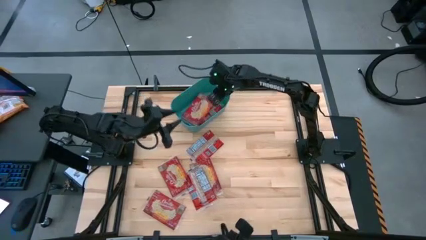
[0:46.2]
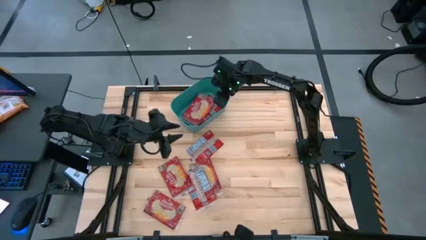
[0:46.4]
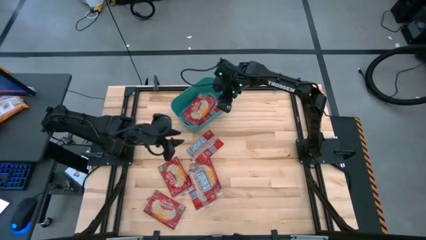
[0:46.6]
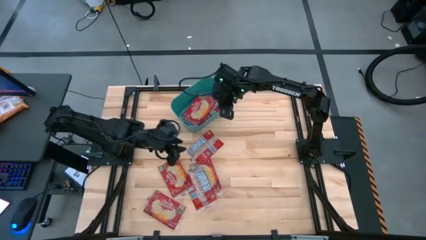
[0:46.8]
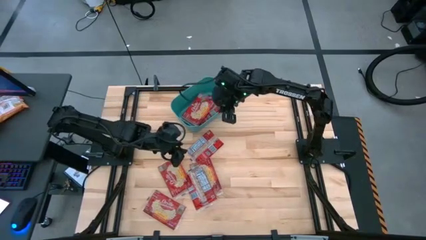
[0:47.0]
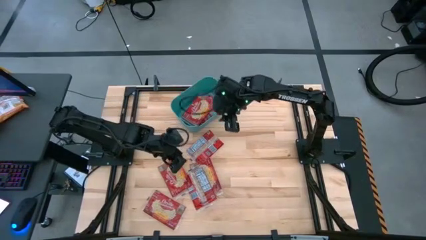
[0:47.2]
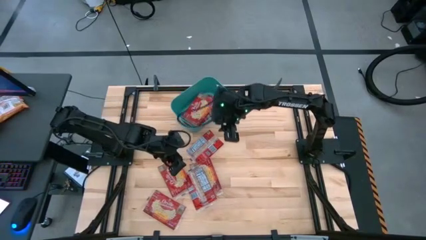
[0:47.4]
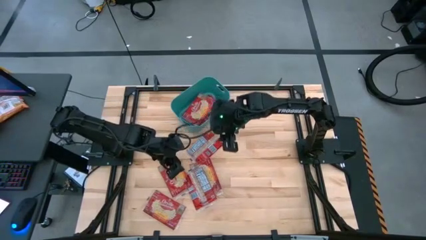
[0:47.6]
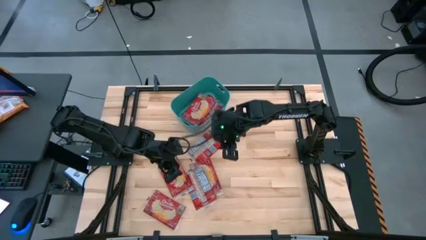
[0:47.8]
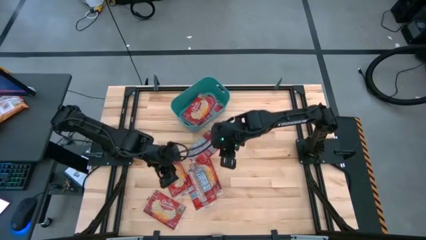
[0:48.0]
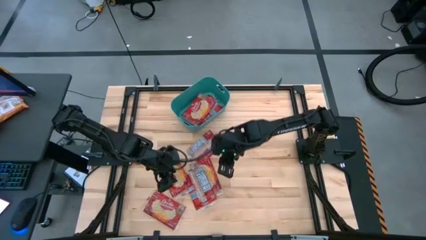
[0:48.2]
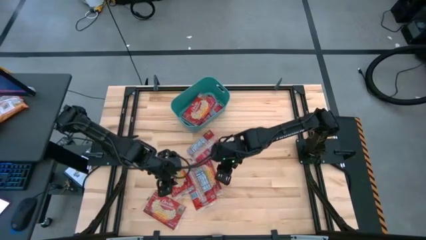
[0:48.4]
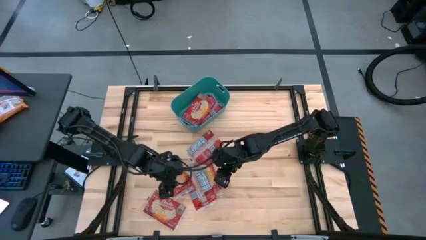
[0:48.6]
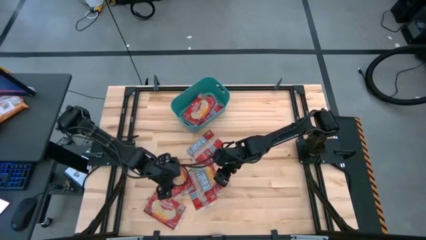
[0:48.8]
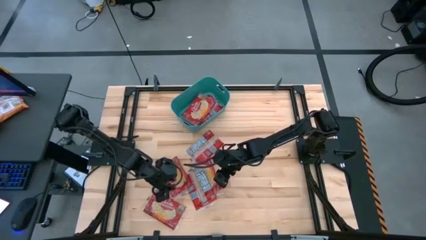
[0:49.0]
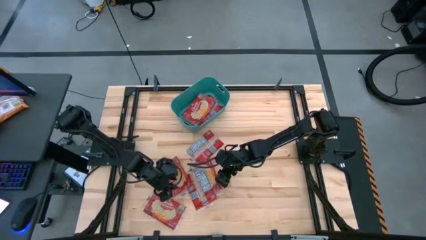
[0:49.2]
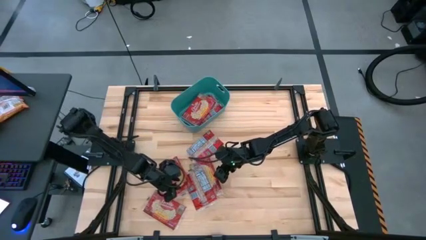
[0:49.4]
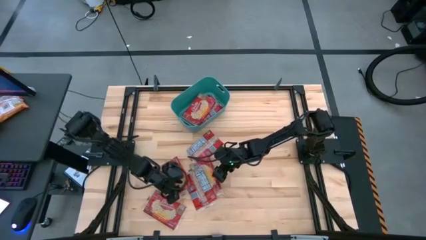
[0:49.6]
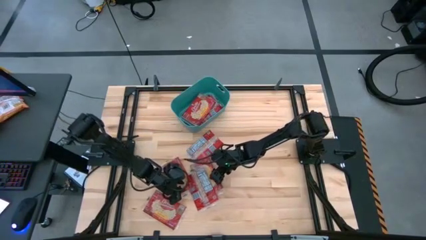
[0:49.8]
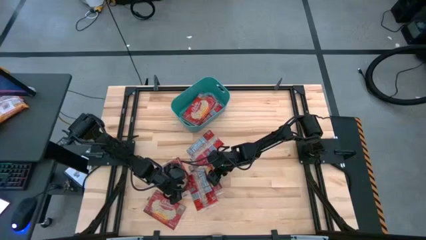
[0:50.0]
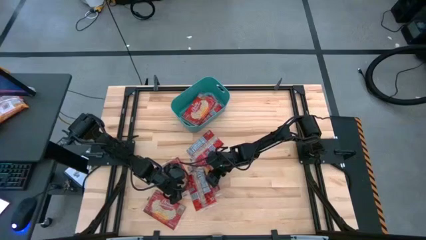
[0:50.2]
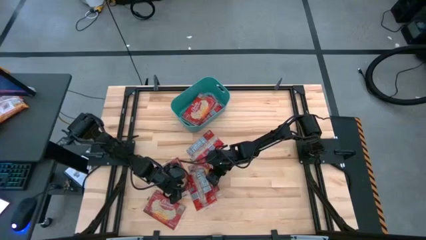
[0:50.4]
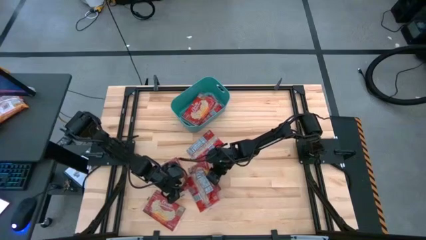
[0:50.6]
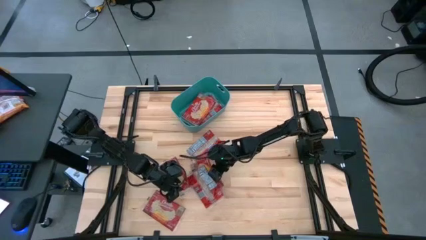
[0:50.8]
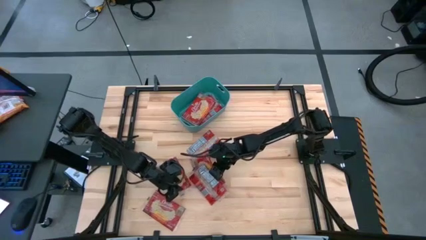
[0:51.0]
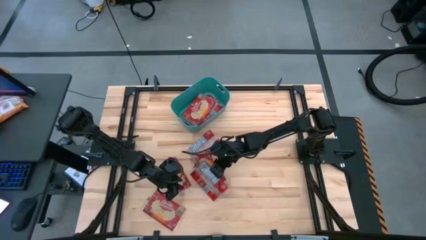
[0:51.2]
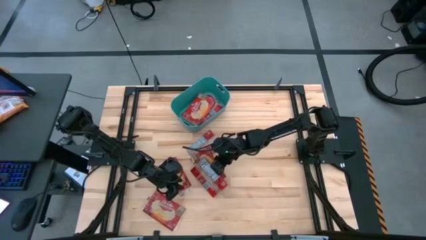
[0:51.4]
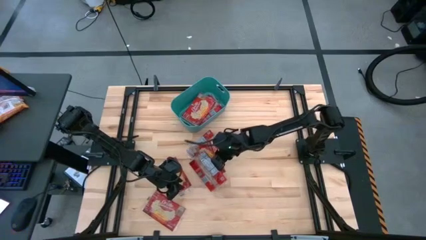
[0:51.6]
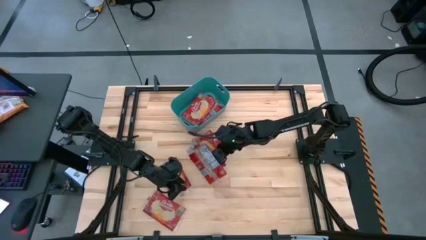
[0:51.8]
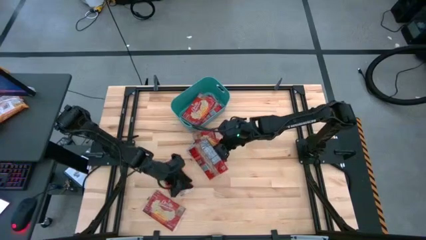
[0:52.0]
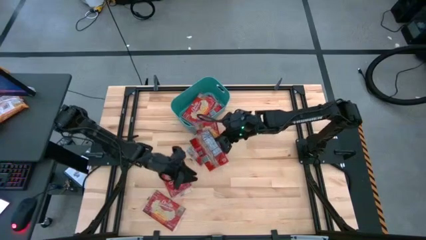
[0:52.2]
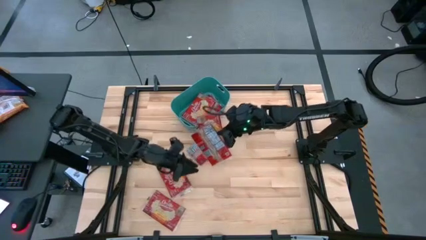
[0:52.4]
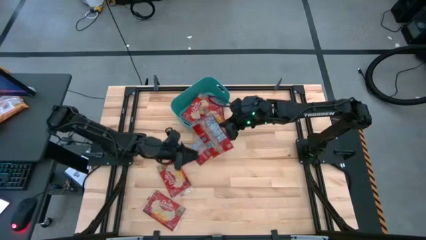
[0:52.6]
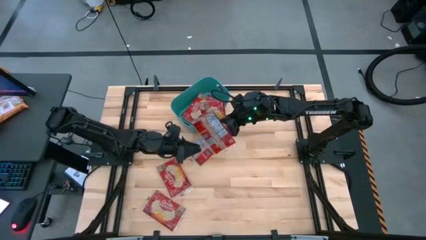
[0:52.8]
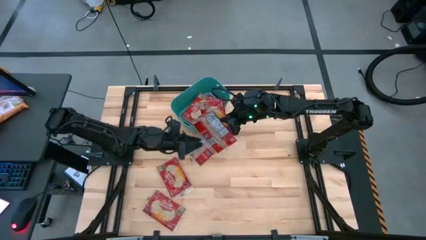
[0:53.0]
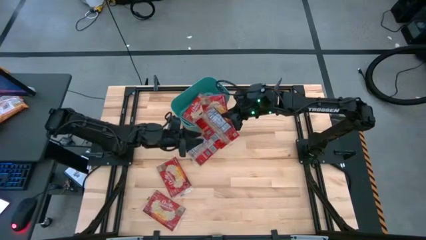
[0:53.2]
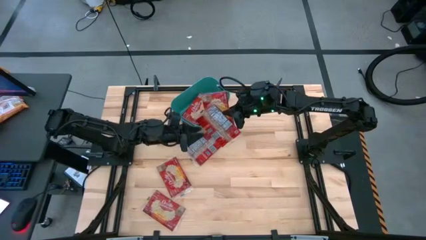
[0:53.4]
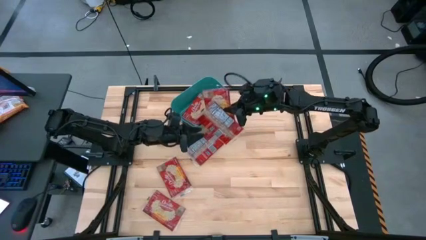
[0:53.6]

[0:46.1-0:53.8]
Task: Sort popcorn bags into baskets
Put the red popcorn bag into the blue bin

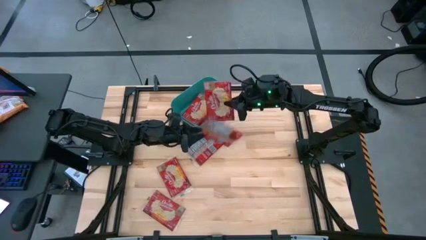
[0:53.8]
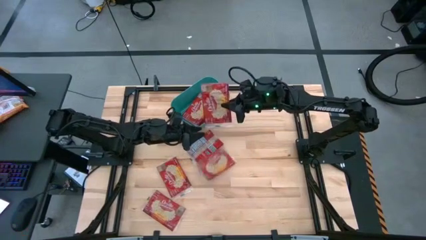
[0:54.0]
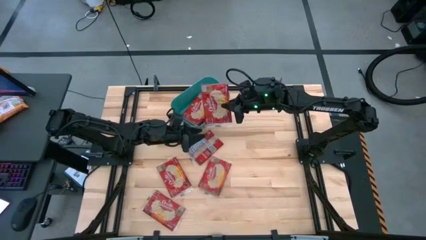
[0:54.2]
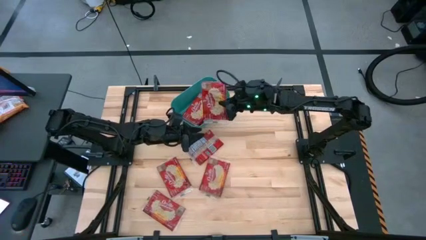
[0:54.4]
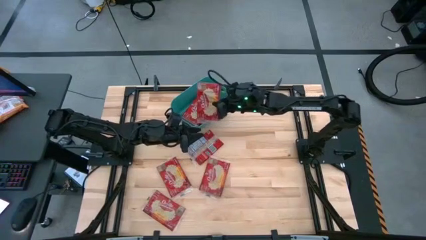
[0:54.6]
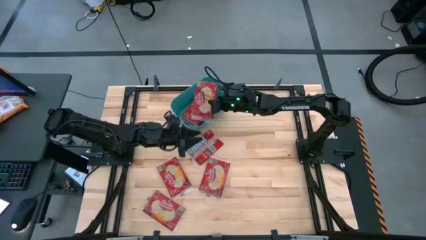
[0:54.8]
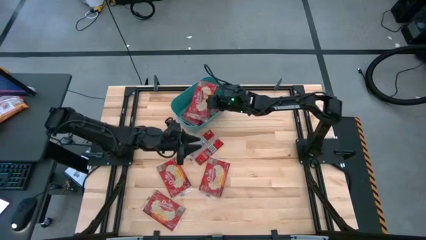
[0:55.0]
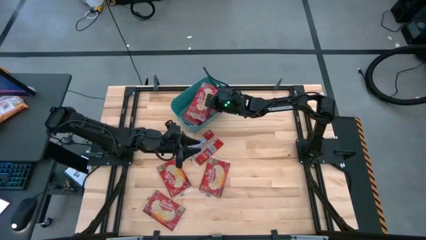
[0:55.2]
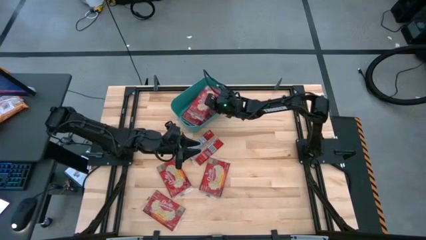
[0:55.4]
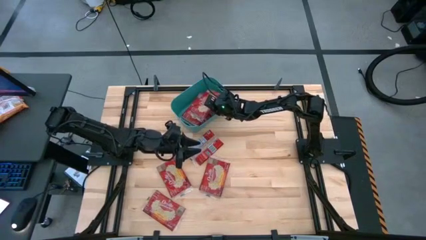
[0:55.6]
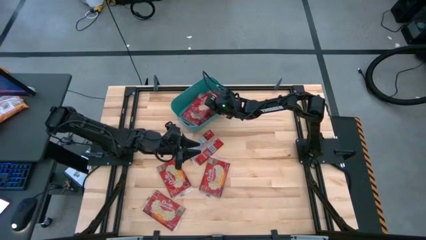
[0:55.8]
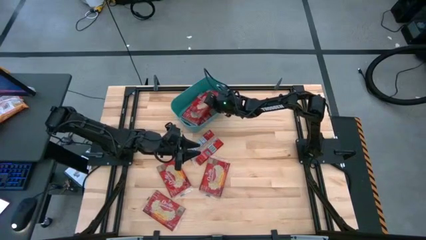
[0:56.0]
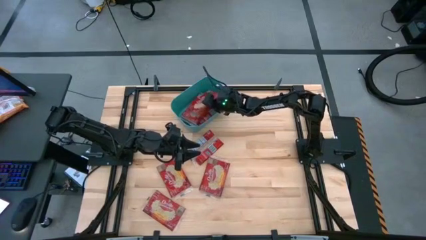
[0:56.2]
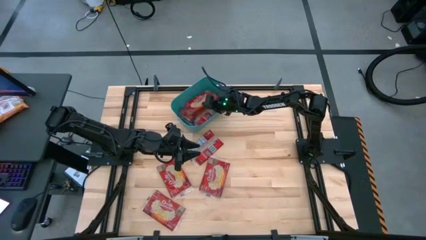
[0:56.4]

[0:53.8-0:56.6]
Put the red popcorn bag into the blue bin

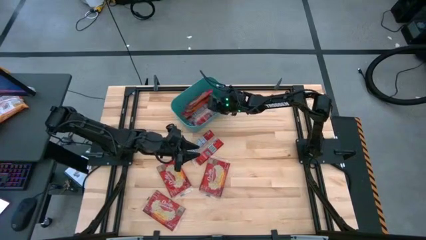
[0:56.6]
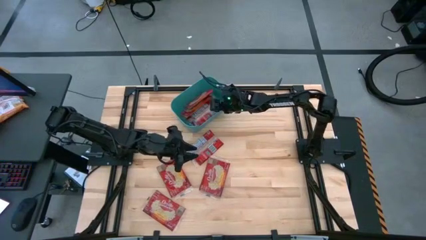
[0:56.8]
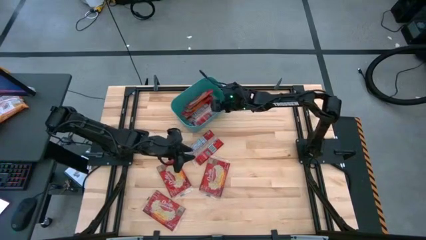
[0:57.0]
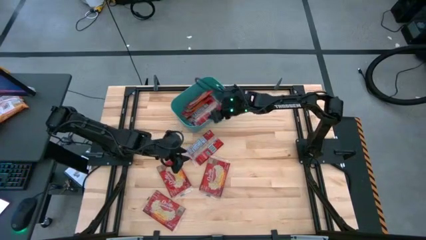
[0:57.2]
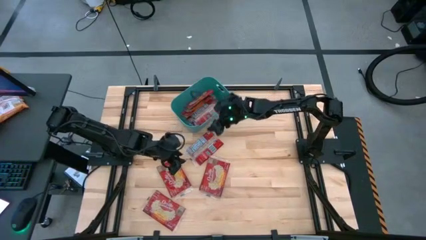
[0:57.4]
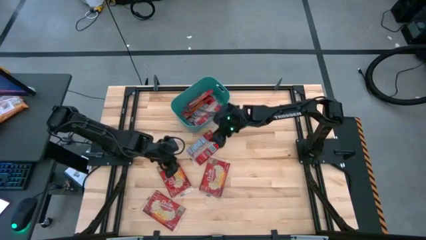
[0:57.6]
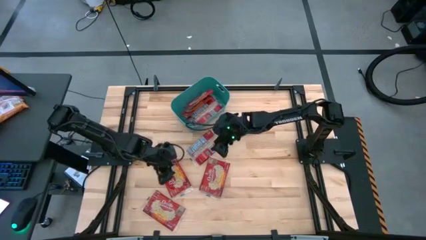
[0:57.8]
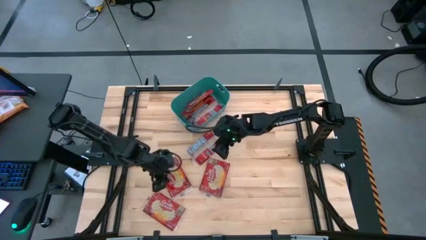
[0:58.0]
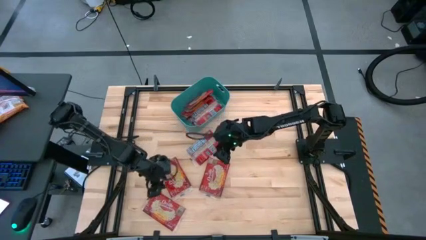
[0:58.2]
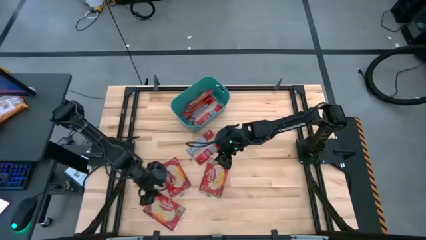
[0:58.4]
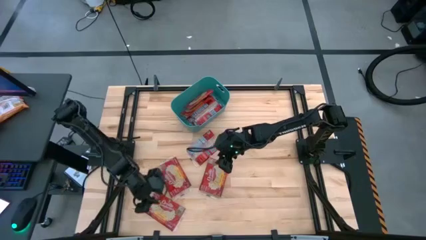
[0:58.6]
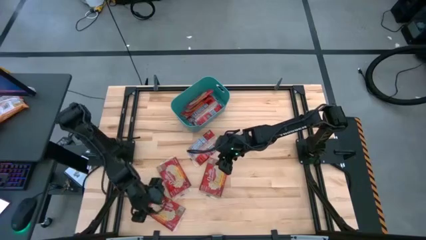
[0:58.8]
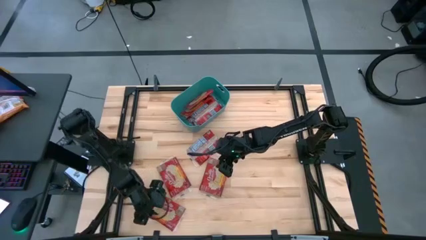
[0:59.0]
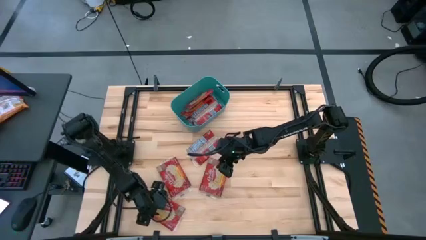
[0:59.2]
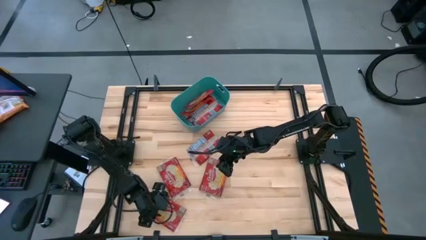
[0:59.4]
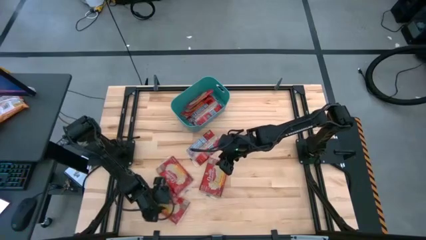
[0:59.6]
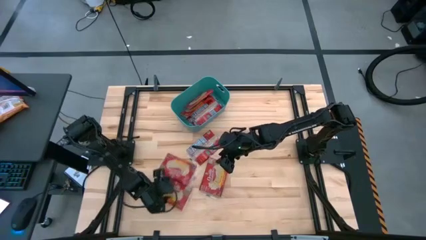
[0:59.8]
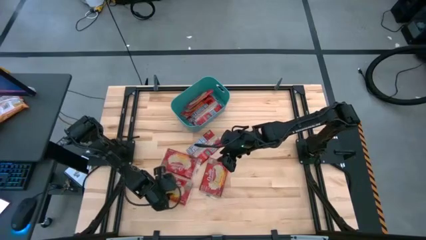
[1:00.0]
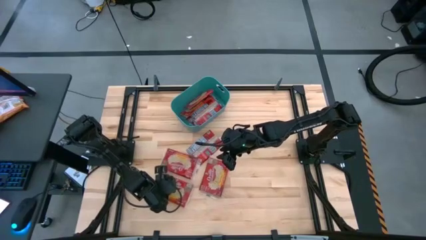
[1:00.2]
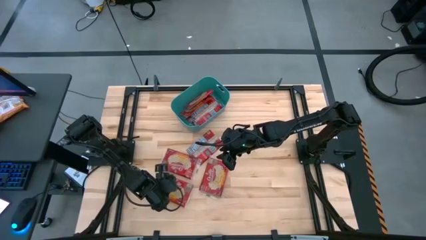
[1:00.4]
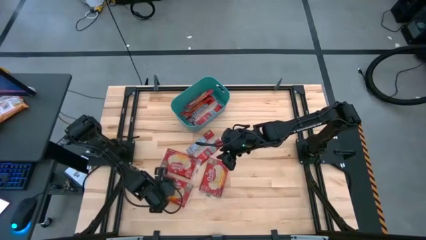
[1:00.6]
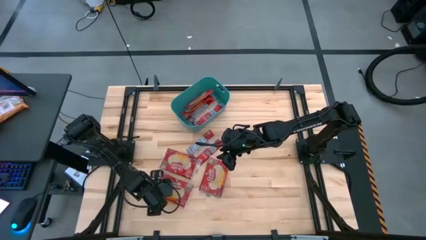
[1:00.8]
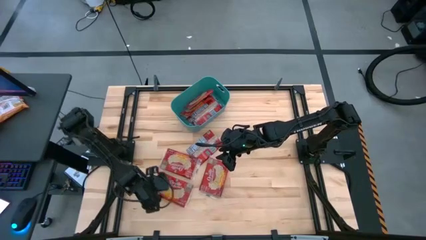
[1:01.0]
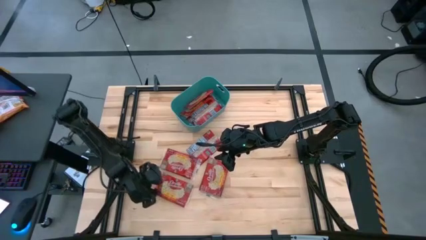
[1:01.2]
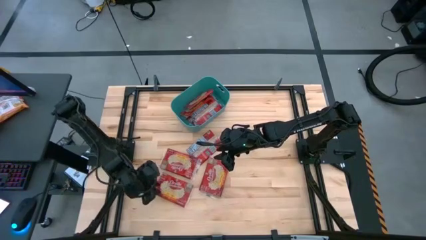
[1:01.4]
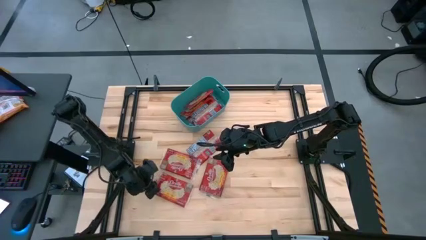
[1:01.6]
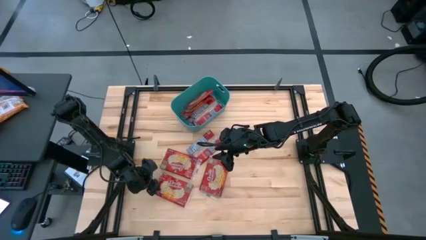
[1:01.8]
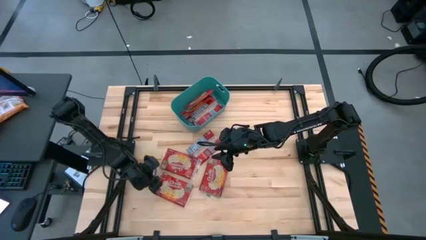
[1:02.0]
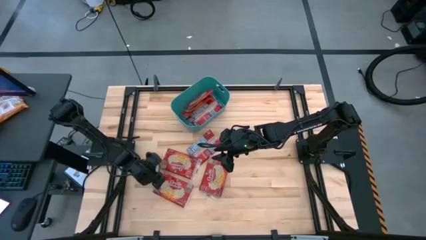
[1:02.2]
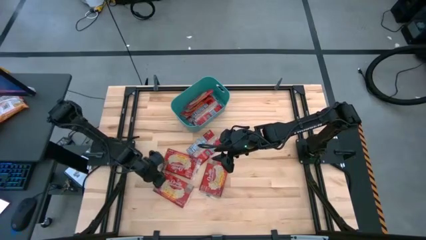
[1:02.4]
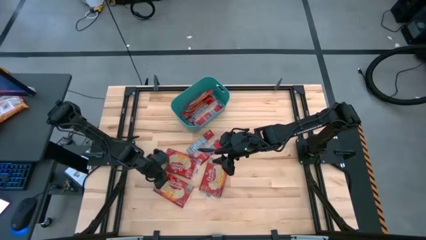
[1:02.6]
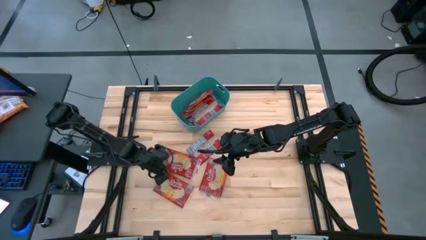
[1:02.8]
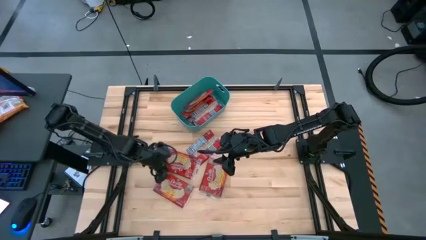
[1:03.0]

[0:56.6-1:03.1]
Move the popcorn bag to the middle left of the table
